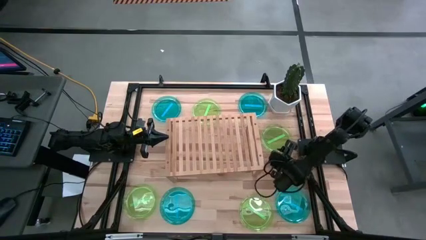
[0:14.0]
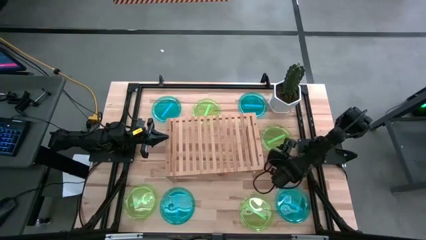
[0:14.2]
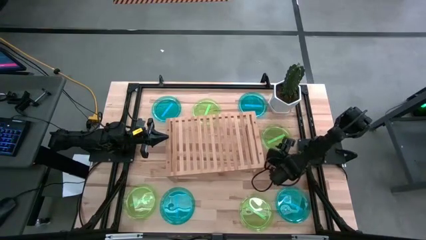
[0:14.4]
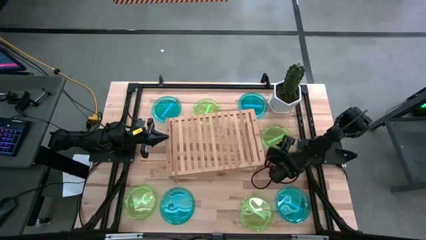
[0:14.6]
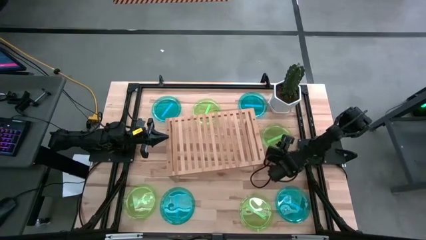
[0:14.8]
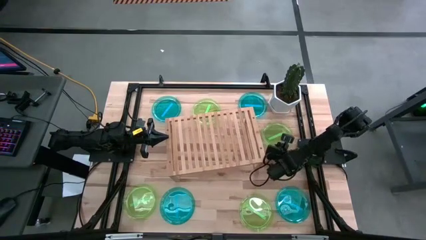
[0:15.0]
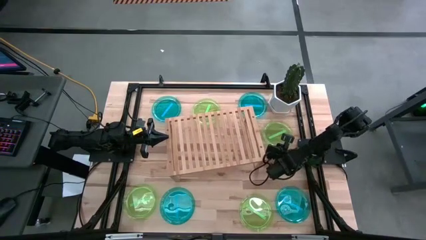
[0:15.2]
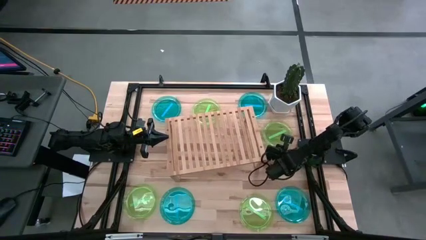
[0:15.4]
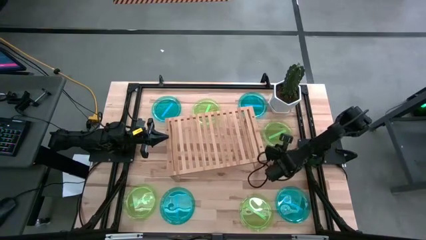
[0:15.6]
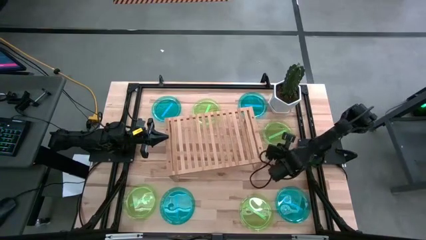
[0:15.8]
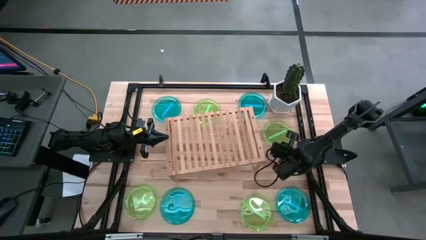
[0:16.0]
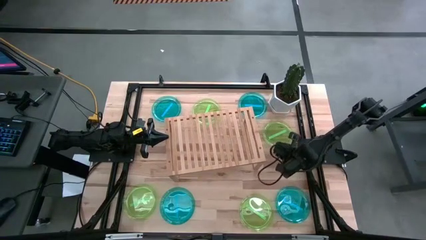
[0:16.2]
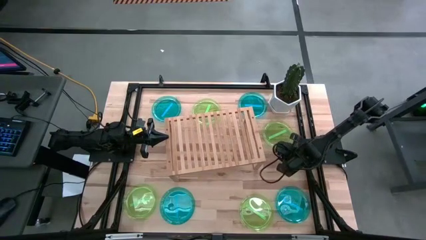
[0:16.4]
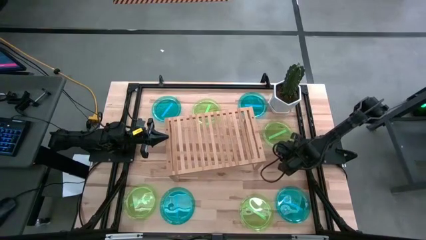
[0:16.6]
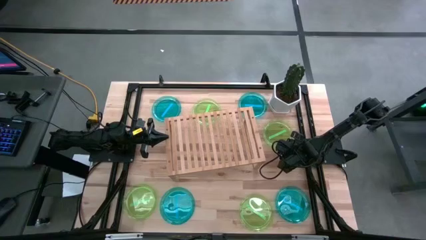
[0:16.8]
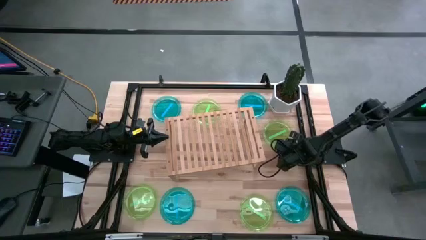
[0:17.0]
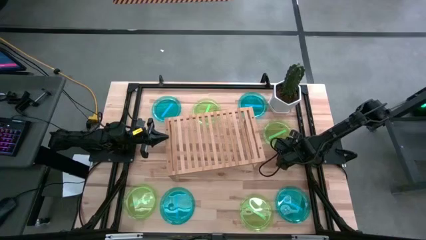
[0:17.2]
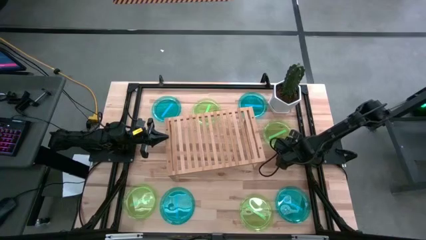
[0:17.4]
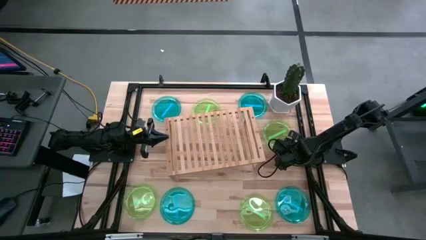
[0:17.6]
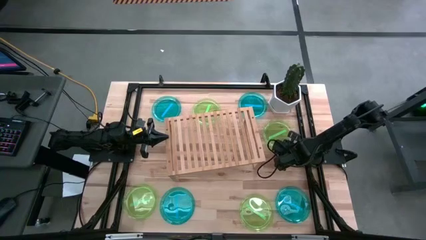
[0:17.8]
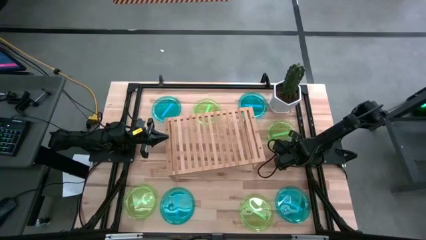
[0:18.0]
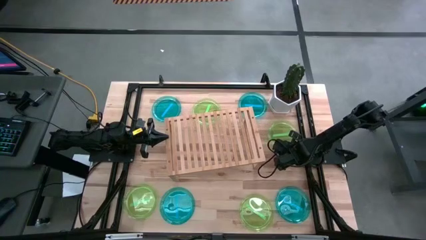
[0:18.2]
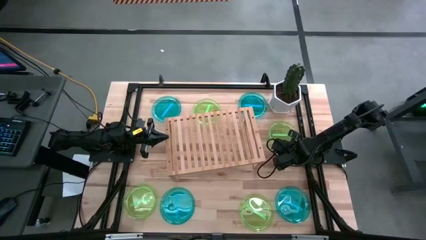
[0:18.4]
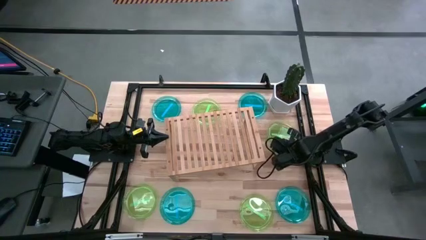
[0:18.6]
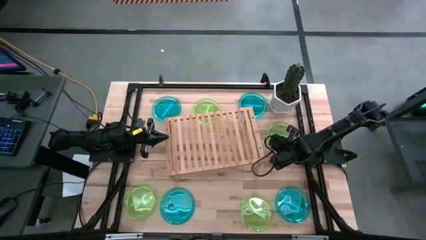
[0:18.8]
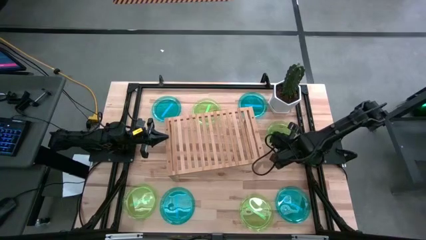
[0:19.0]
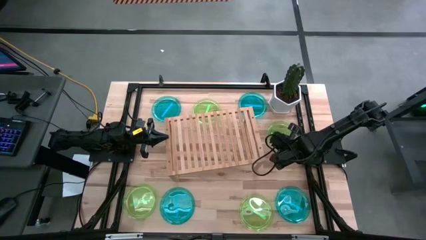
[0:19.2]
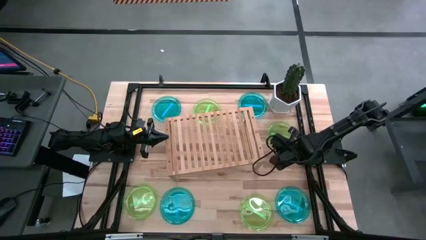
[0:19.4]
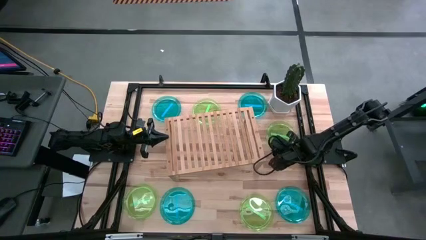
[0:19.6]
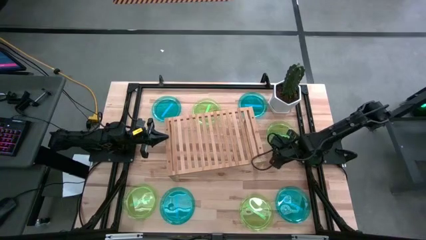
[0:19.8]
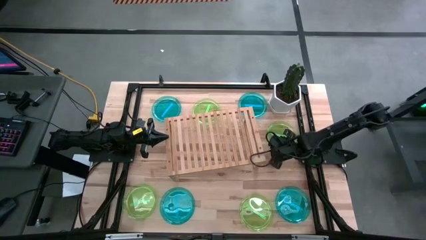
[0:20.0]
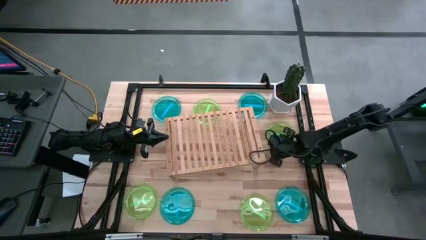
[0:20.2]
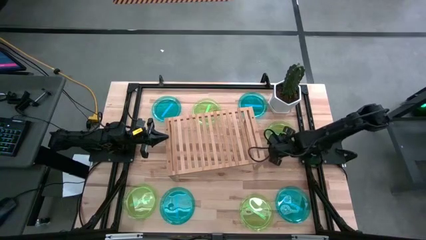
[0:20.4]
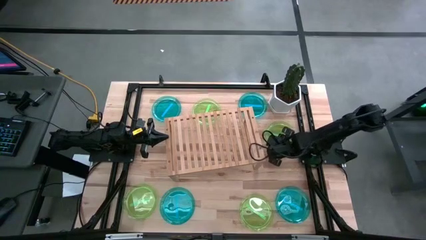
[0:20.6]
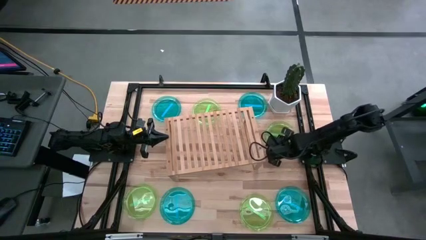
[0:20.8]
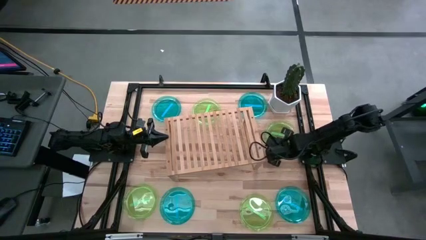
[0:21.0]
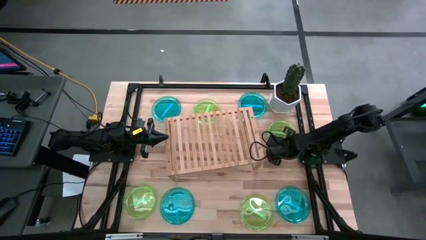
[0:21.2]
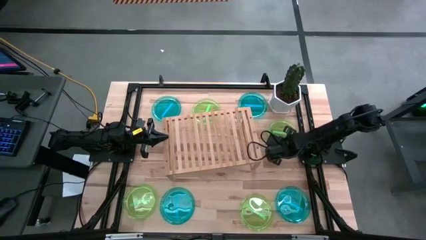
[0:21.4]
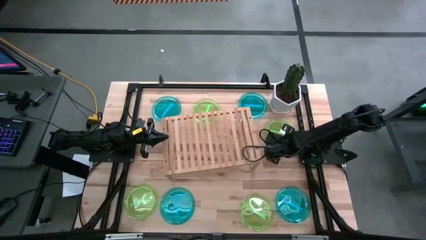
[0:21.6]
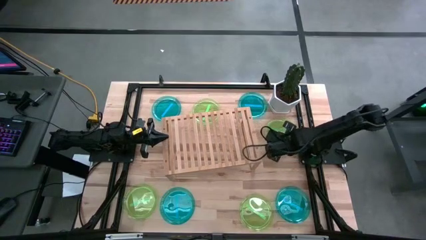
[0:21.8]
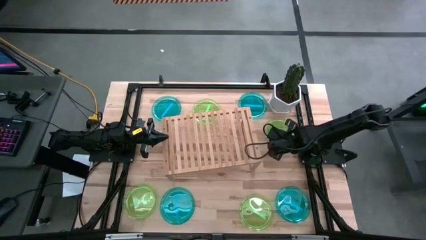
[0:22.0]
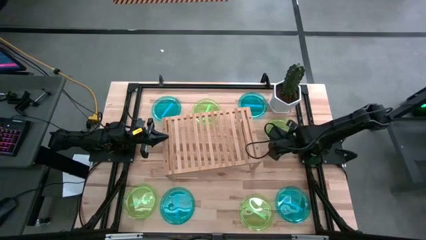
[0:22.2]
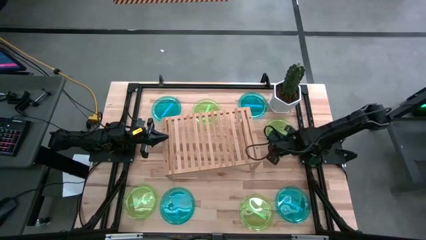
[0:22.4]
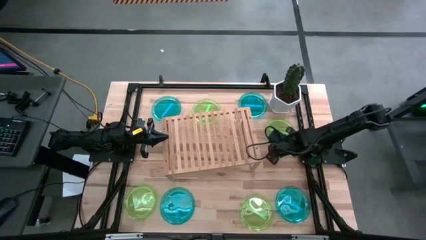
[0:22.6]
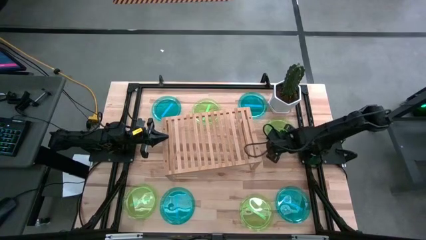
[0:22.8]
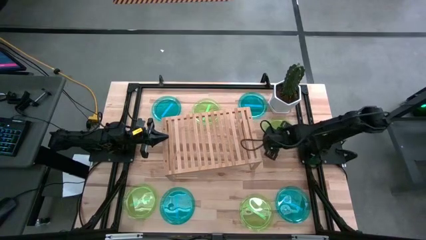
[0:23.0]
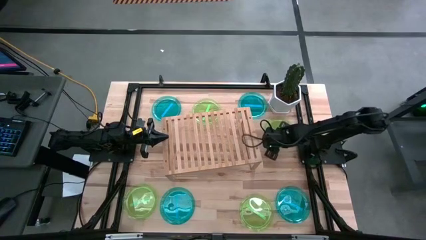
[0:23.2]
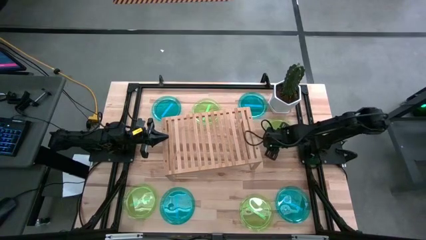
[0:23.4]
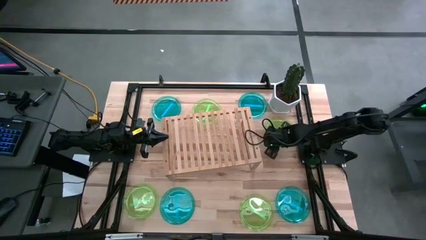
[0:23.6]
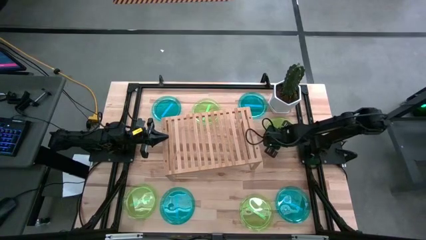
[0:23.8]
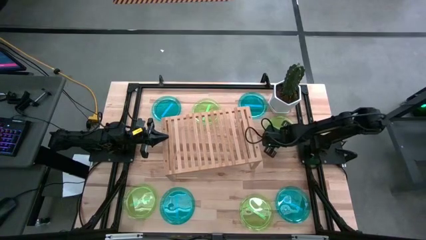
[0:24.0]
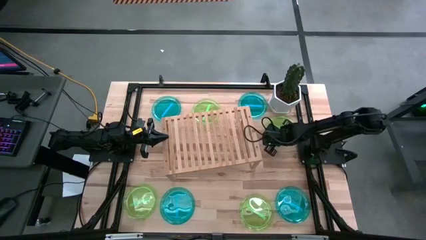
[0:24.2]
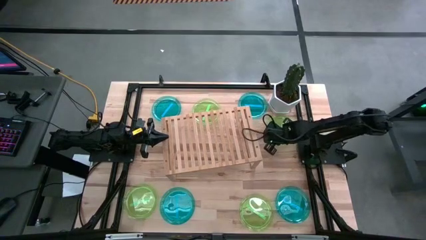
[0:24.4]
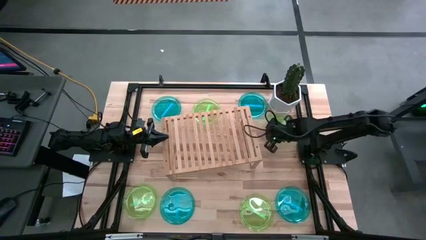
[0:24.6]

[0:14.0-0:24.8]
Task: Place and stack plates onto a shelf
Put the green plate on the shelf

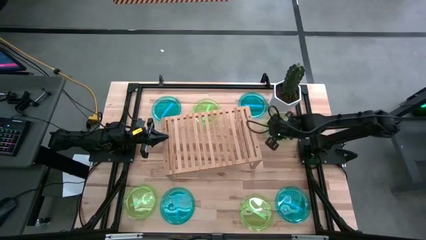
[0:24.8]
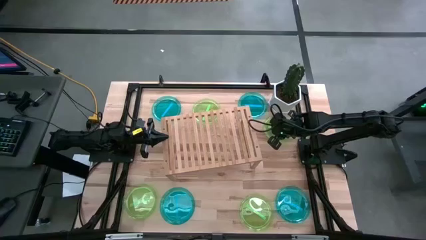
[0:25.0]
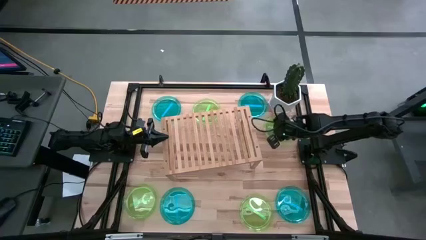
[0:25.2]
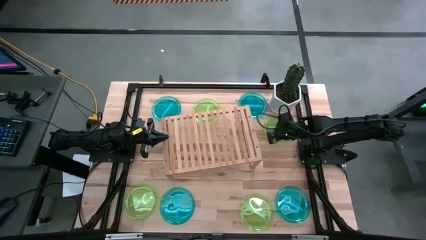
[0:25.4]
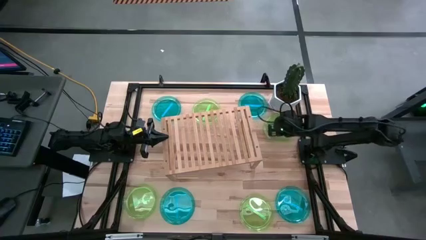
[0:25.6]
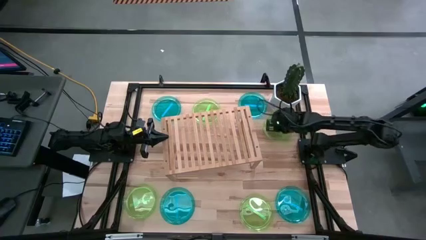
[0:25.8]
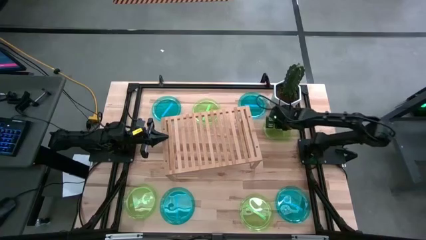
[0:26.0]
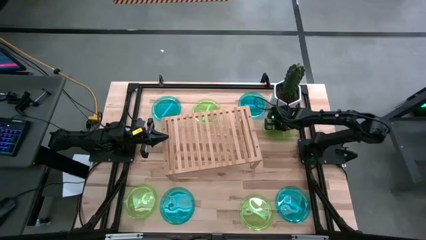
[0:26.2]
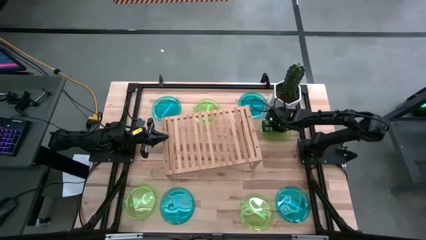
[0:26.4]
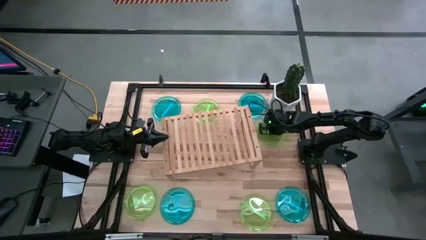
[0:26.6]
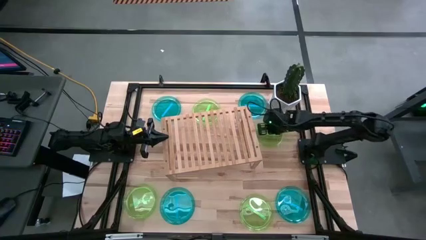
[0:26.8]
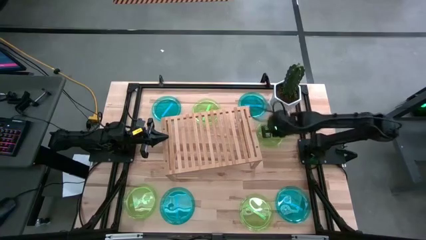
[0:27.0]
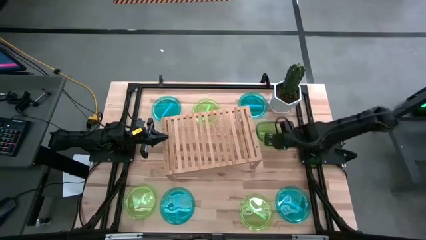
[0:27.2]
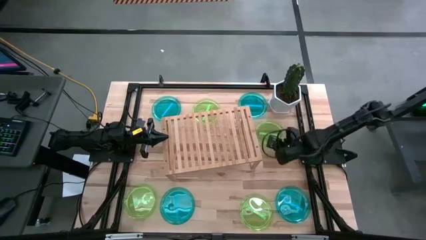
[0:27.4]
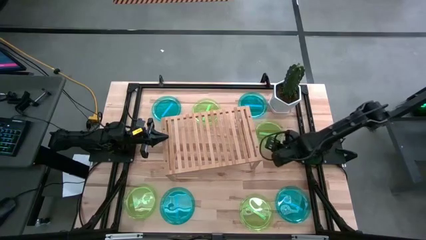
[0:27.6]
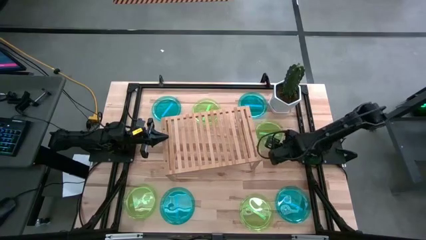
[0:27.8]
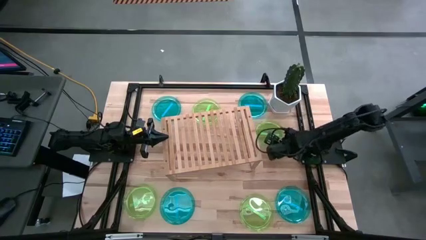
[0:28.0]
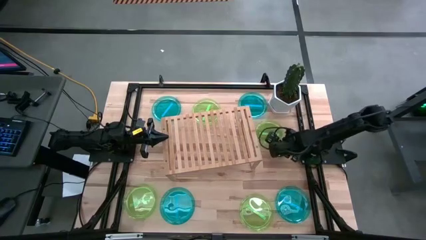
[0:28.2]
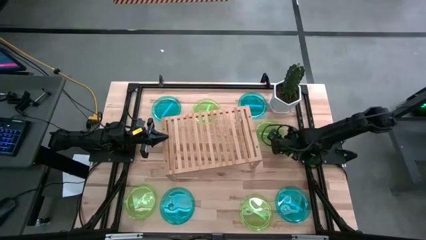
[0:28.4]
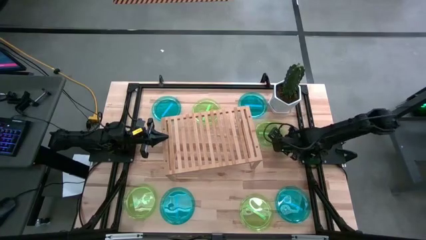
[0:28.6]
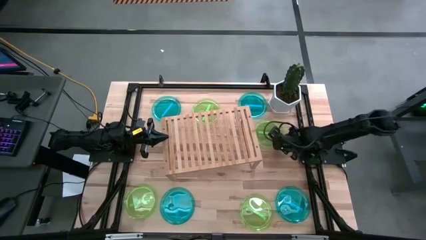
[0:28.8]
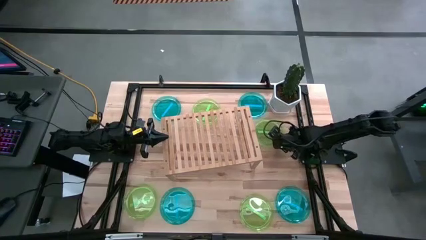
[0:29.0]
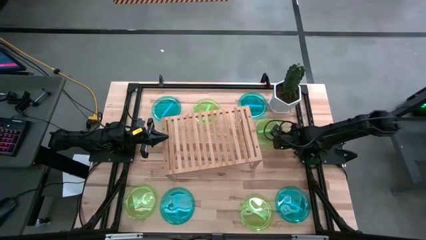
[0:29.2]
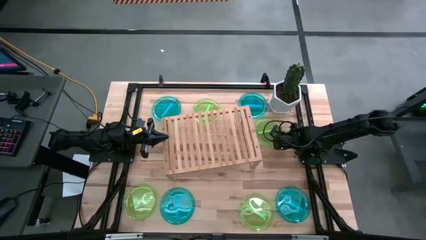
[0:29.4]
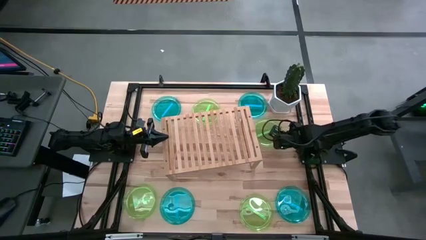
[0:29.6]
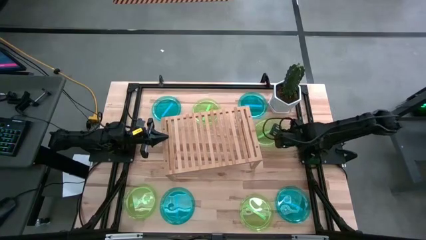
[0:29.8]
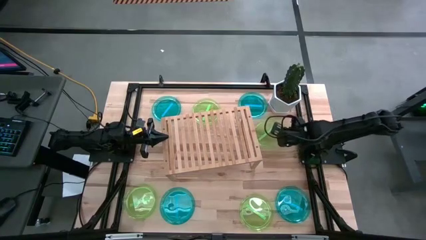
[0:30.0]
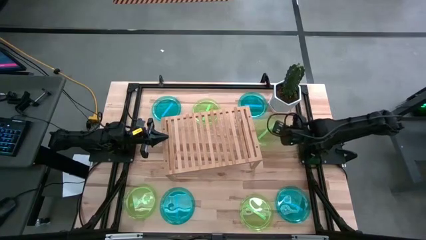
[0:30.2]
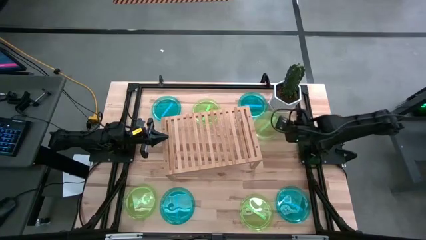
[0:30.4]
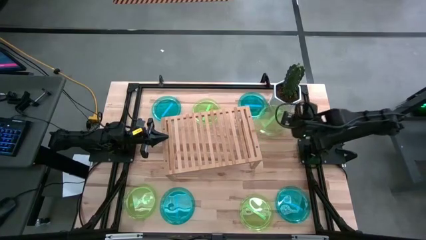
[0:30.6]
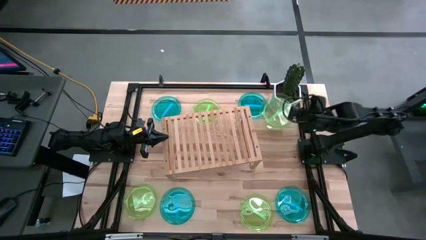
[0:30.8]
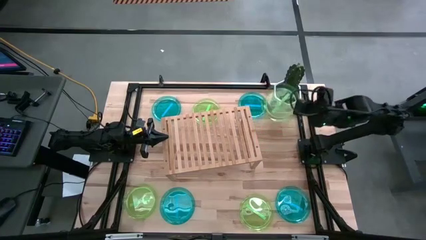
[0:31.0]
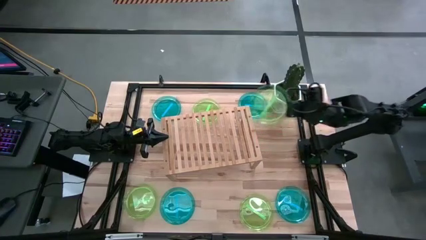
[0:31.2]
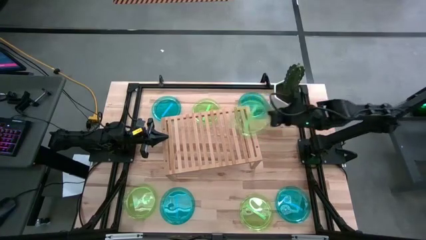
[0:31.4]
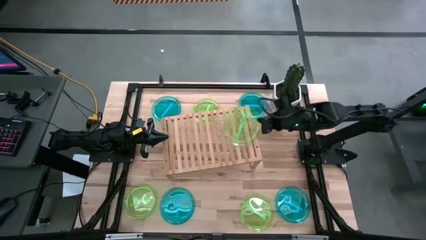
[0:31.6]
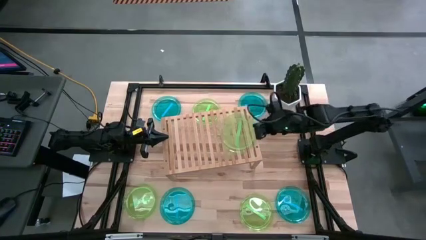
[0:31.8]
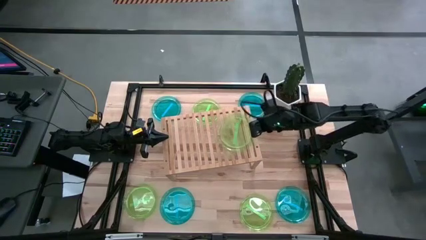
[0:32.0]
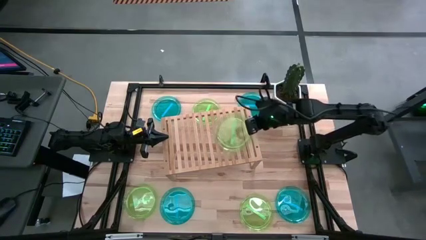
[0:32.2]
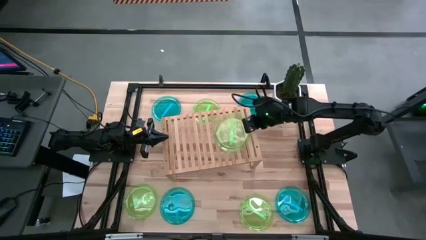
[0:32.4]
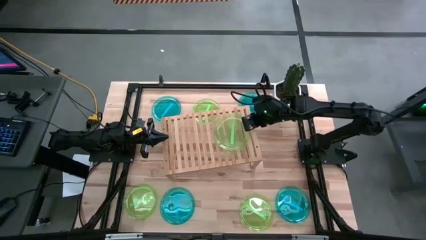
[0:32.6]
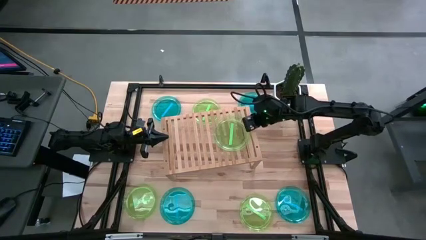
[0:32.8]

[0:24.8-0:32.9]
Put the green plate on the shelf
